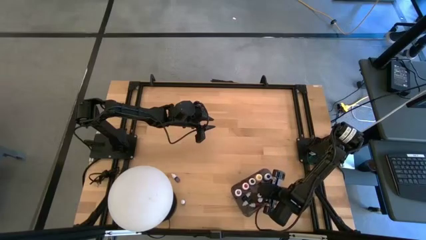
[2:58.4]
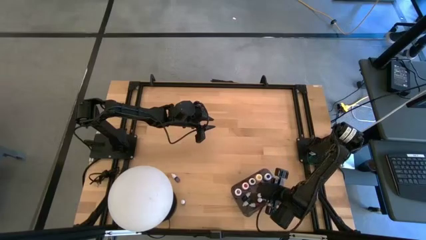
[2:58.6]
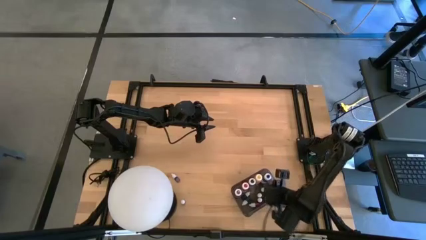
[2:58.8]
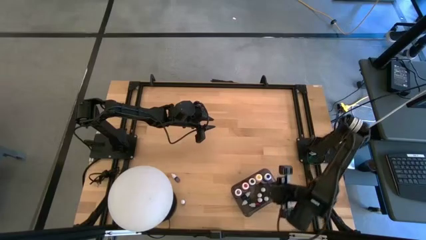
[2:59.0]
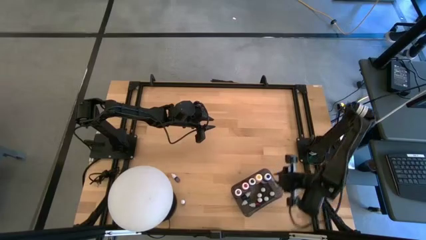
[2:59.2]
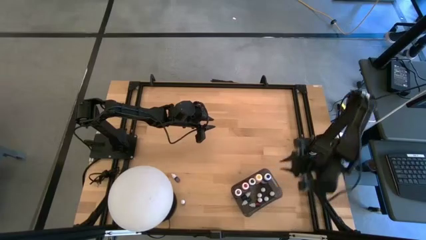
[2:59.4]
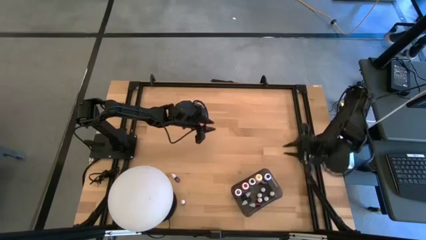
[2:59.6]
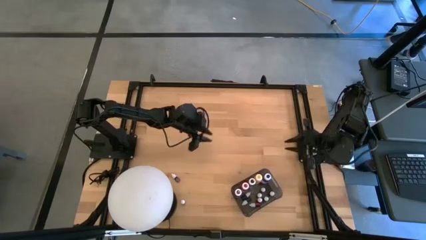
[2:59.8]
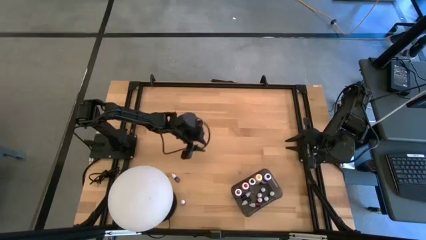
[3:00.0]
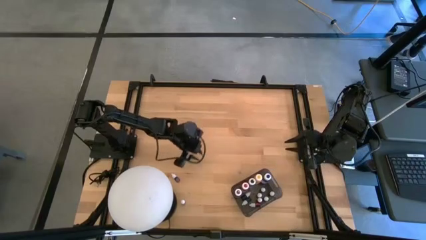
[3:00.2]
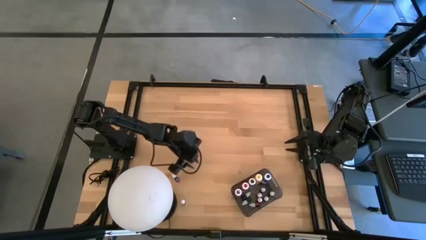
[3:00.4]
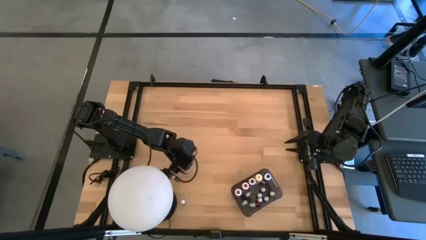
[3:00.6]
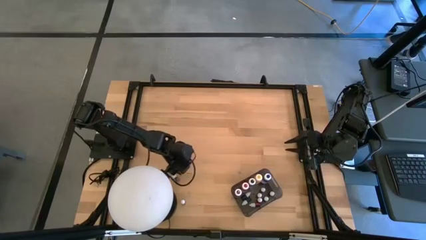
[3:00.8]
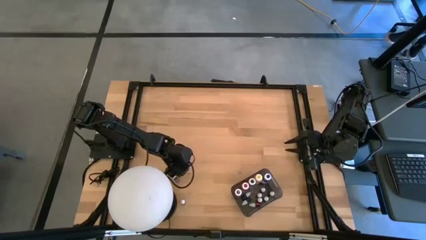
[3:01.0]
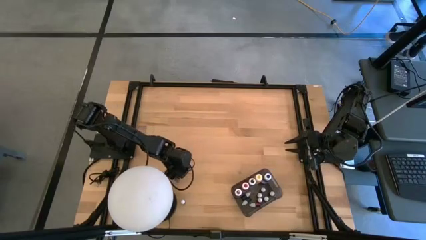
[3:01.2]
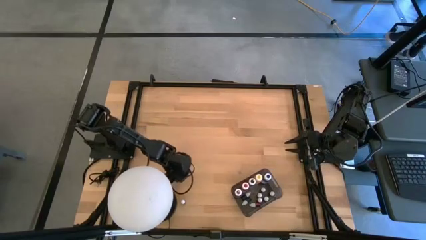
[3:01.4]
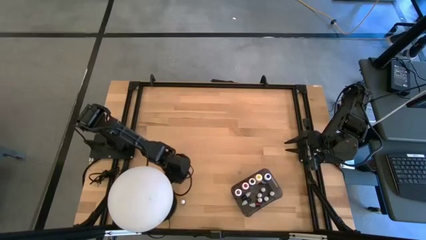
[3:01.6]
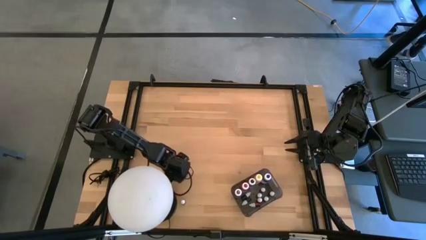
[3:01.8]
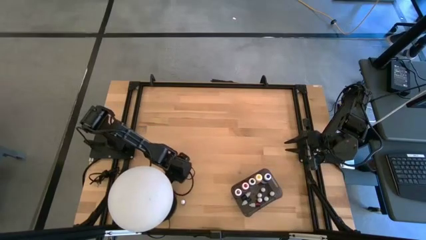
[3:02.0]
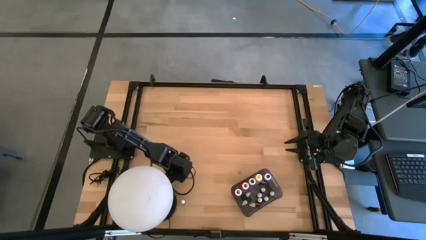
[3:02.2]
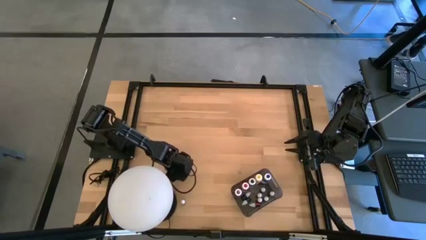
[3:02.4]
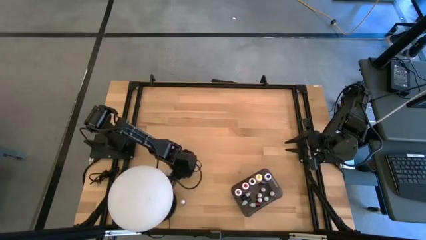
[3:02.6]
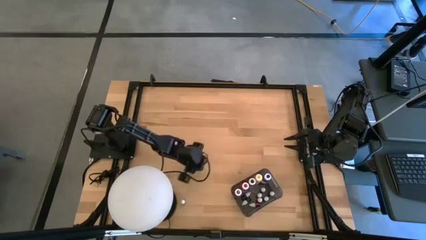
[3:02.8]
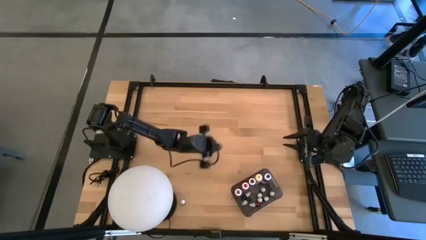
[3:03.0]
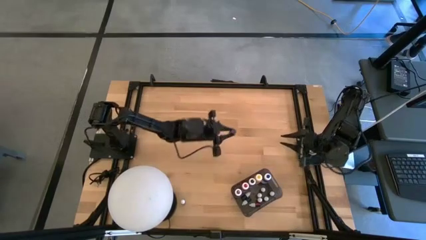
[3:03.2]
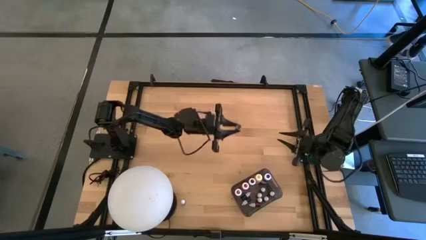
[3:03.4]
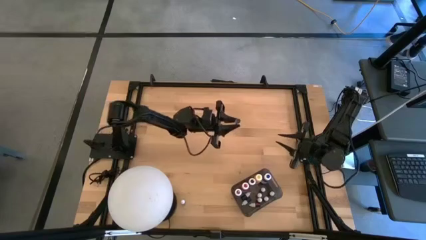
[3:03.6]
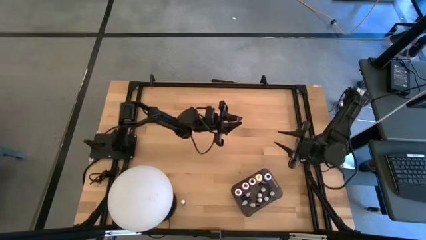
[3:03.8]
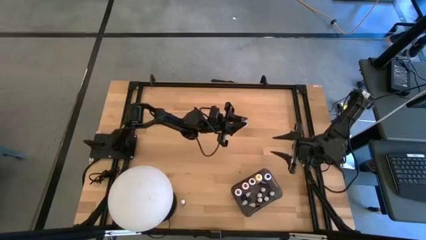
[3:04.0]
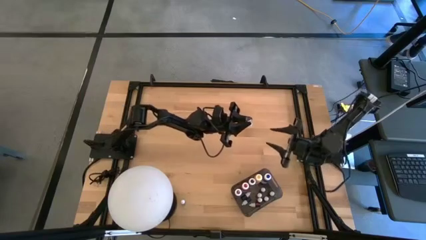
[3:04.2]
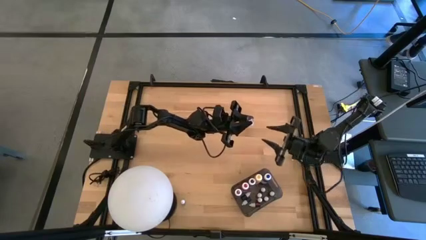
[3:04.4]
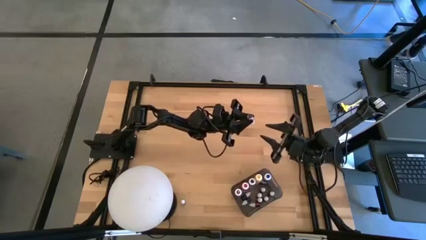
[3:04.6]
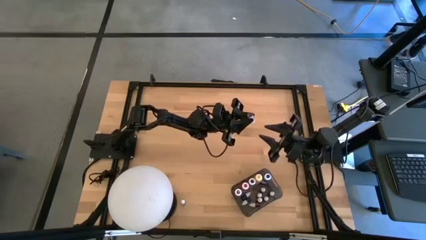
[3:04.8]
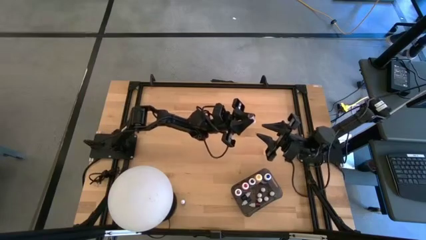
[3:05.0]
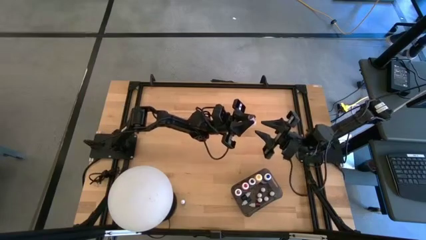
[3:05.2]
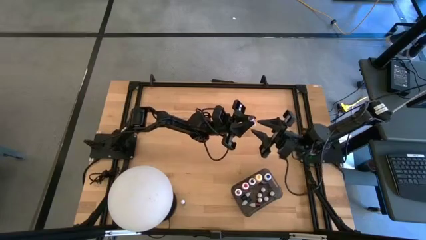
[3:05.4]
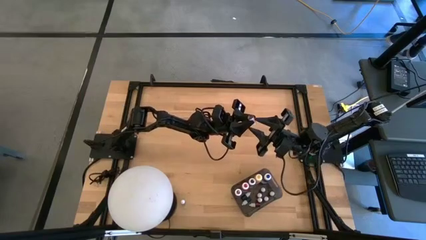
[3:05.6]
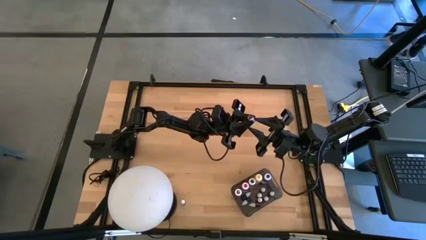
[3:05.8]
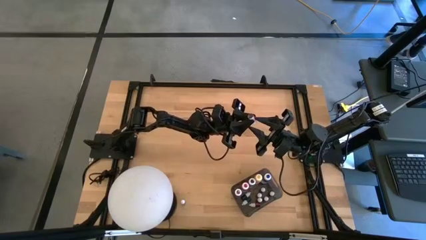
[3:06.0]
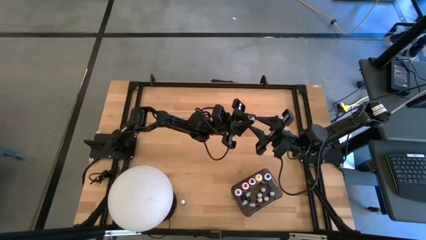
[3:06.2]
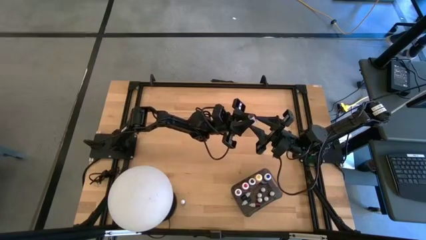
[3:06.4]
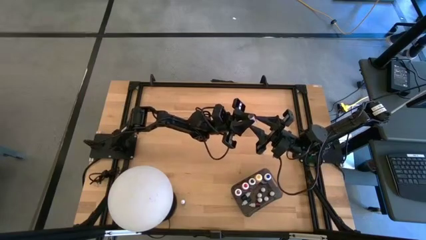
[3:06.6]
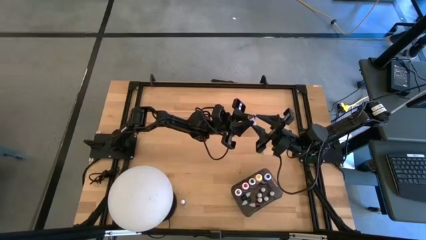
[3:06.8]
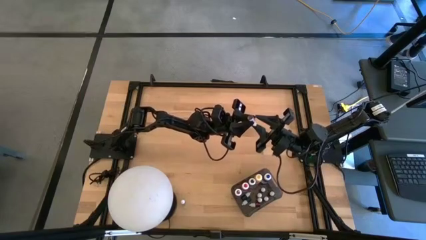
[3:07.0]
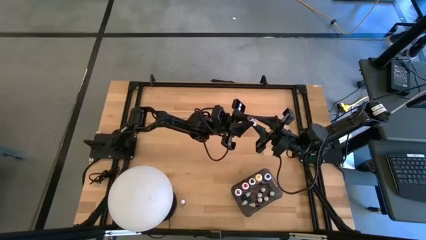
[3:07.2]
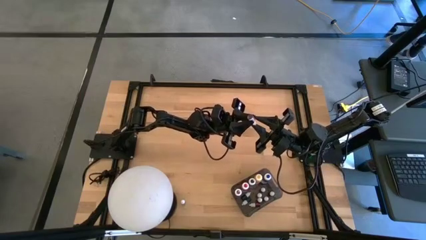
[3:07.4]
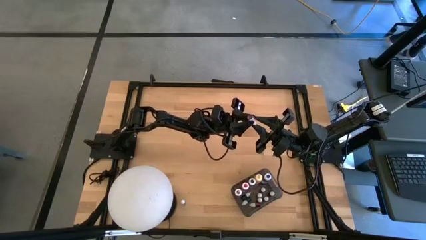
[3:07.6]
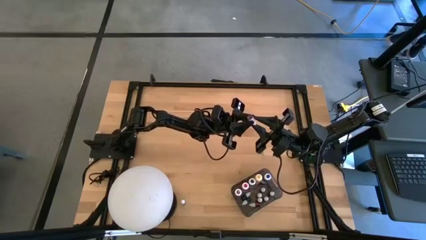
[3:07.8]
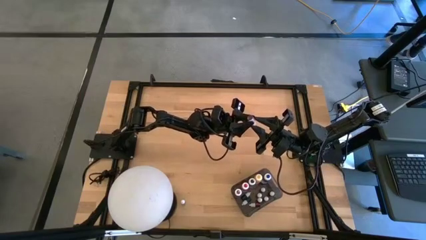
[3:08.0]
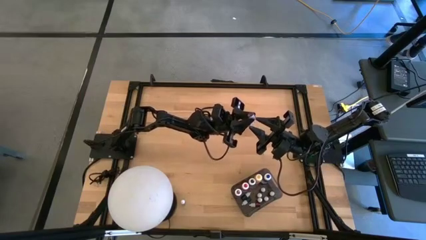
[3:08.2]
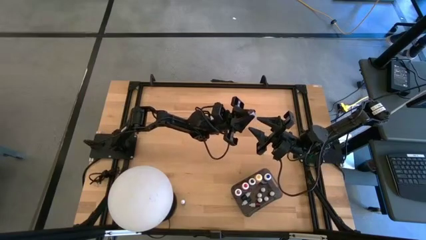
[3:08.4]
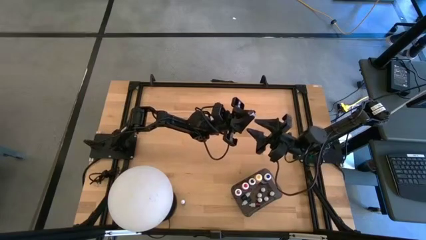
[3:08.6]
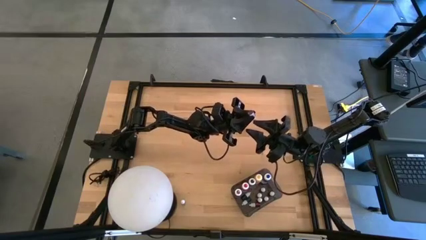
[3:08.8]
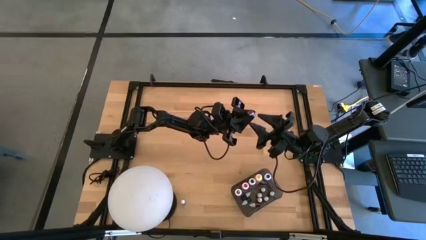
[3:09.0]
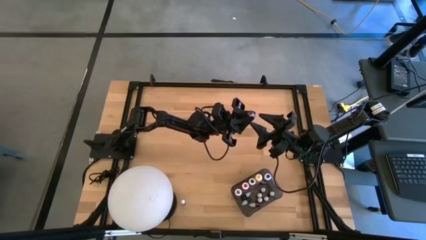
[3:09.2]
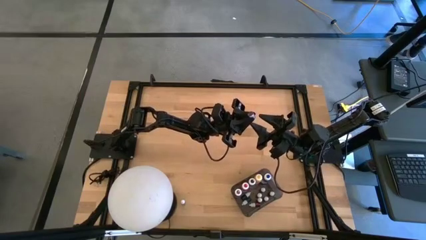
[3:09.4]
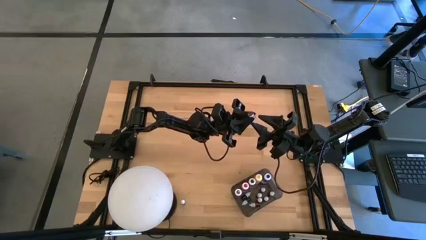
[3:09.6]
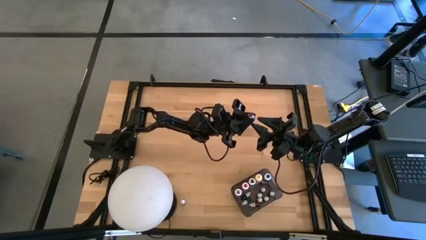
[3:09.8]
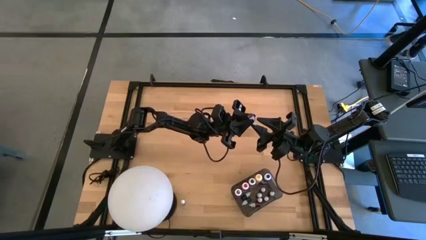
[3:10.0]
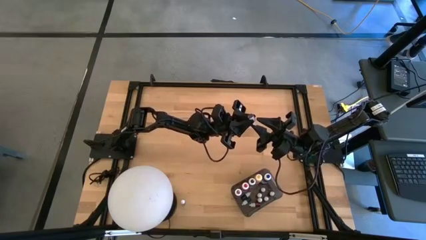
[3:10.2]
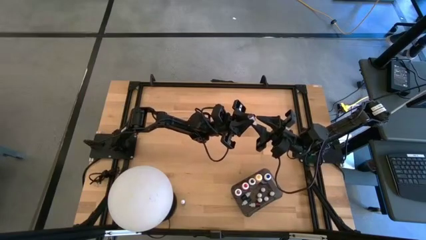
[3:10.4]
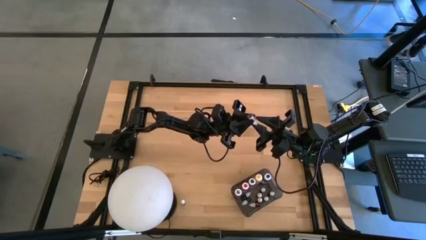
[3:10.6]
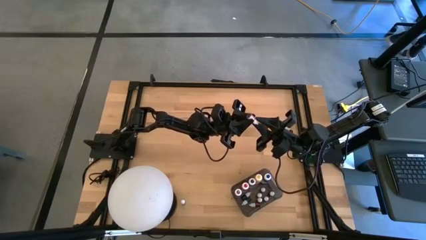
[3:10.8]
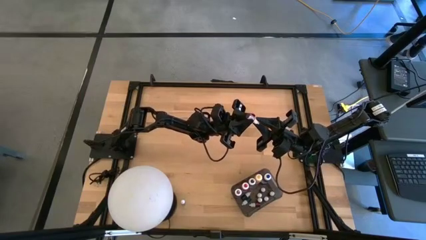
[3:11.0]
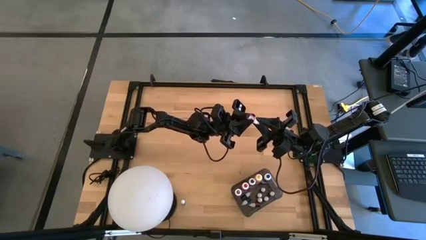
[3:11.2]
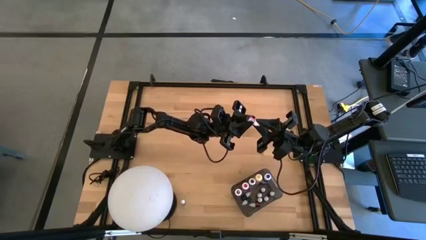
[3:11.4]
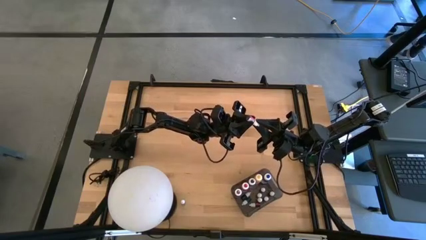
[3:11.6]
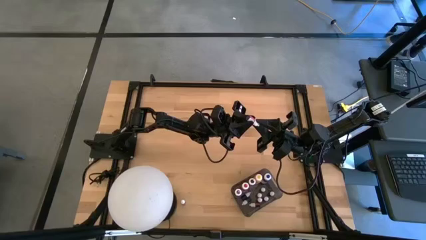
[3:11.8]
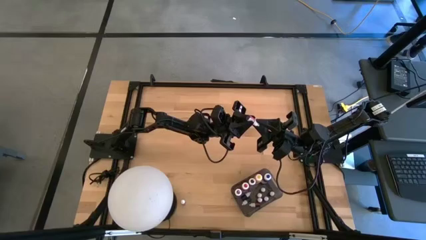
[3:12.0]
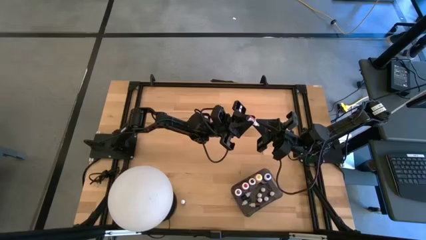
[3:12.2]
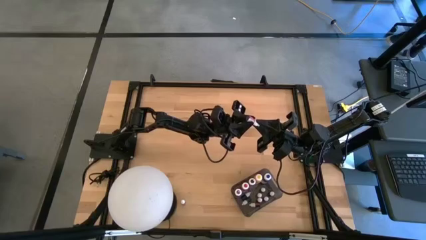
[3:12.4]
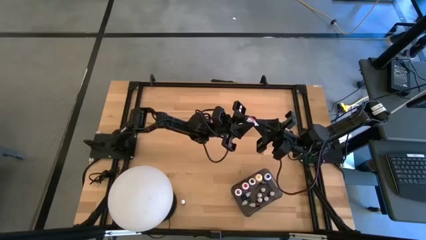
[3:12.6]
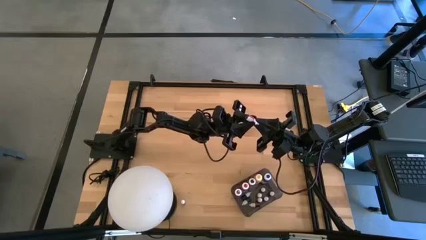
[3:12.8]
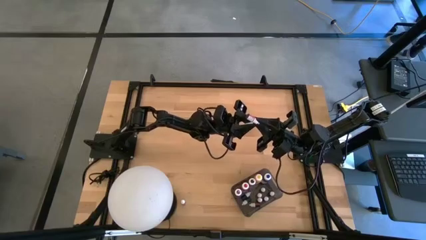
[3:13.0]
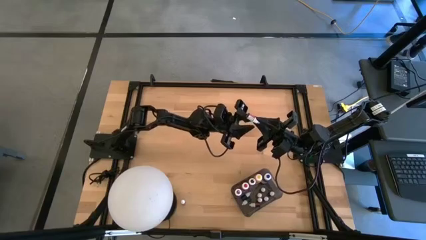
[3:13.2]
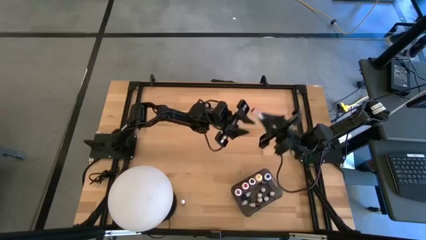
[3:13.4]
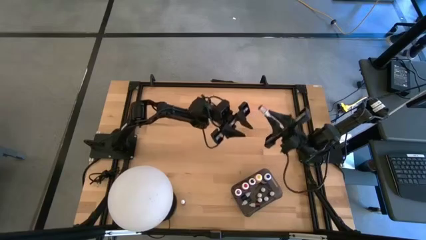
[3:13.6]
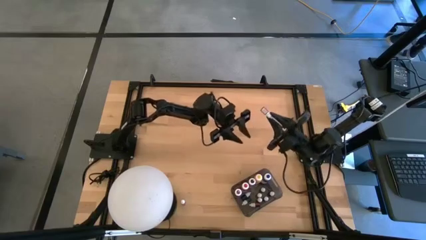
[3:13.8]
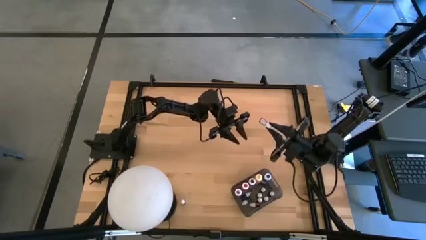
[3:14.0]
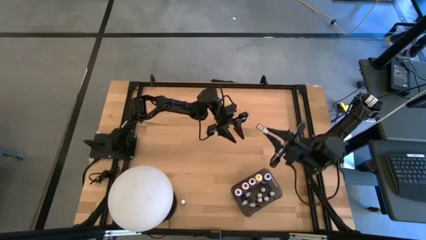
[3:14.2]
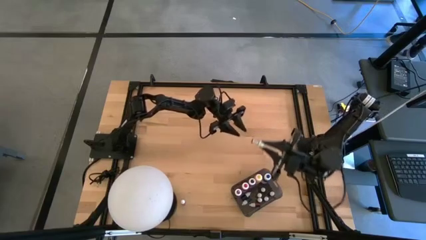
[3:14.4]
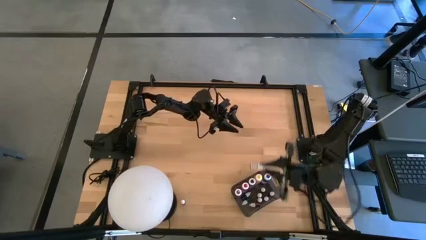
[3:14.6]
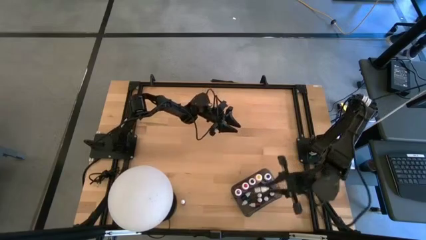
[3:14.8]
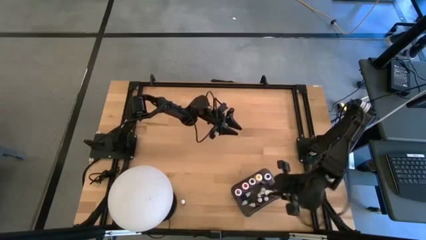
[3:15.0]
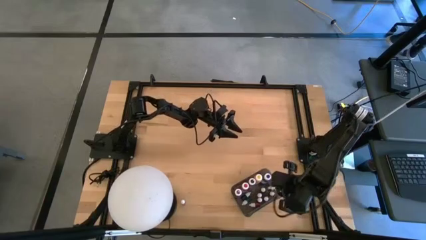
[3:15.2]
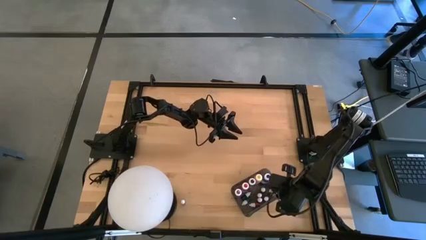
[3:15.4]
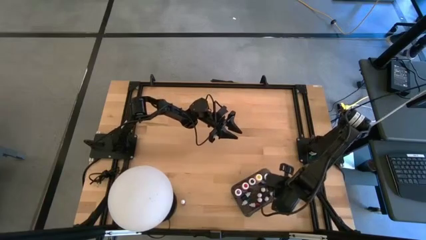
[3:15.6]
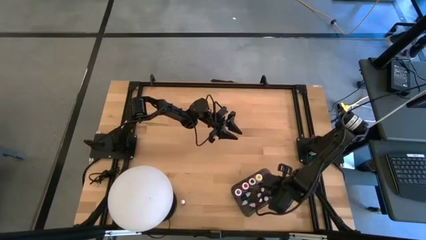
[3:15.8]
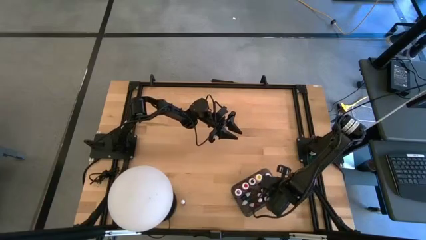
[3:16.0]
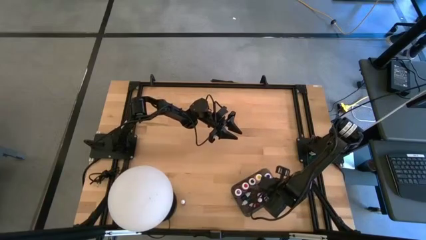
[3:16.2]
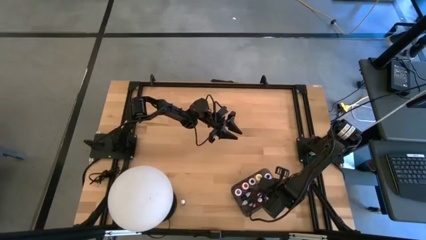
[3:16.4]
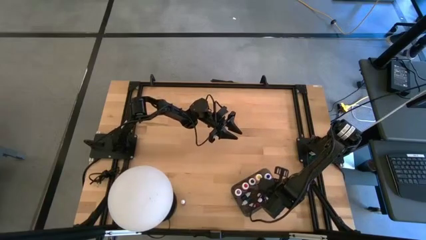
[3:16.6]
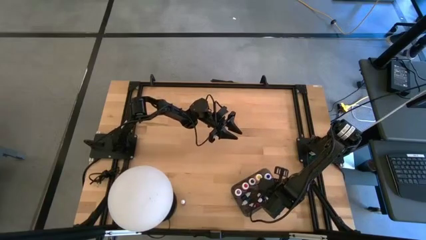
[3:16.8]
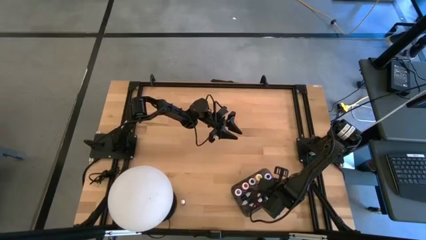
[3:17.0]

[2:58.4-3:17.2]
Task: Pick & Place food coloring
Put the small red food coloring bottle into the bin
